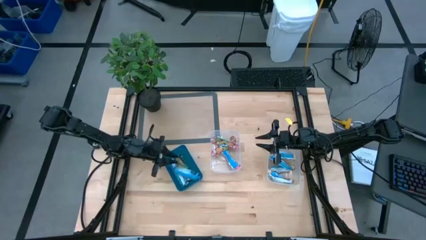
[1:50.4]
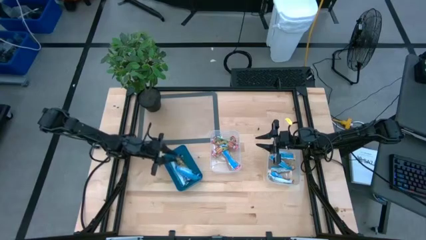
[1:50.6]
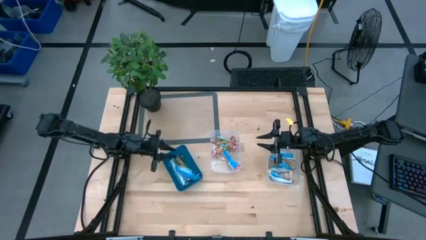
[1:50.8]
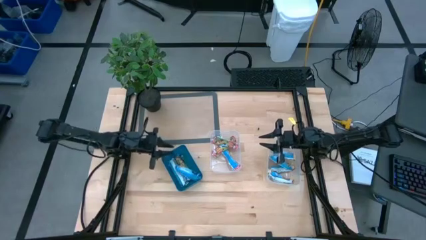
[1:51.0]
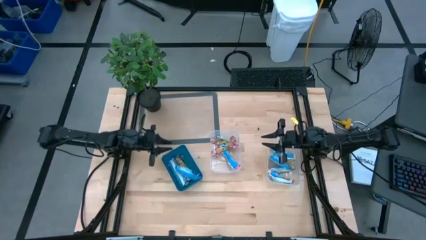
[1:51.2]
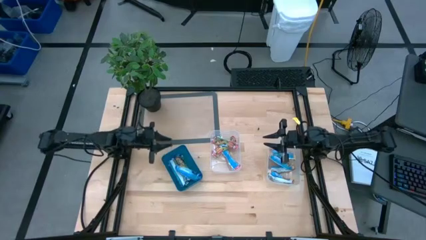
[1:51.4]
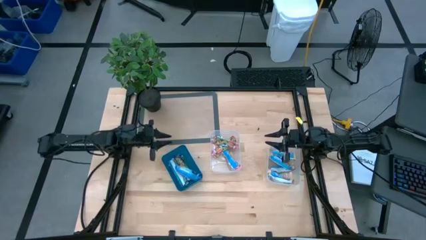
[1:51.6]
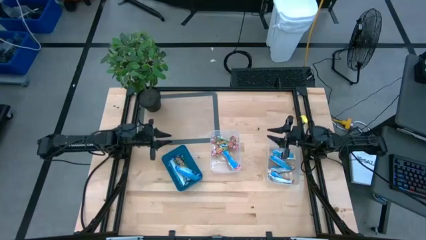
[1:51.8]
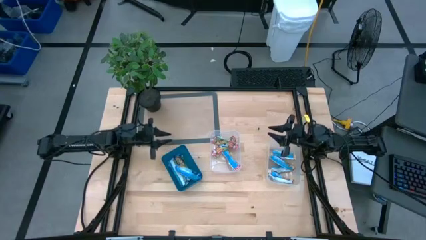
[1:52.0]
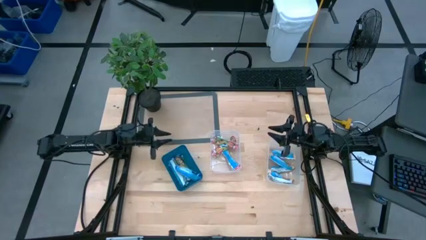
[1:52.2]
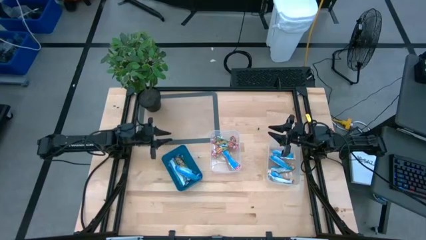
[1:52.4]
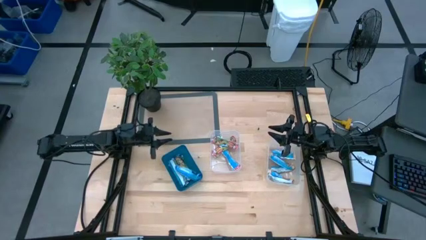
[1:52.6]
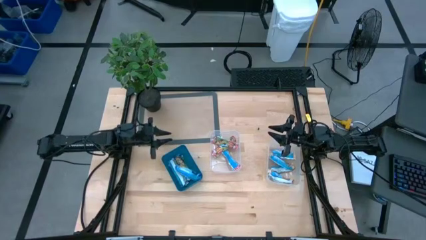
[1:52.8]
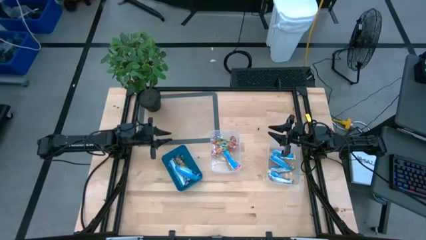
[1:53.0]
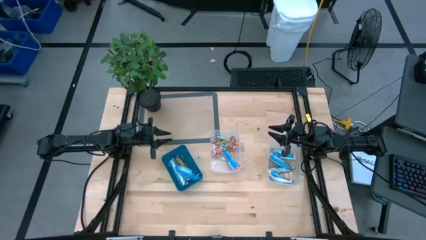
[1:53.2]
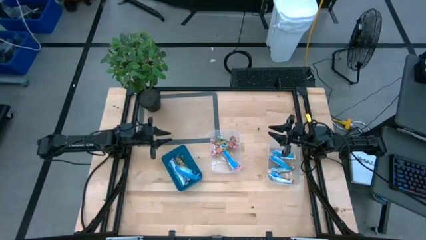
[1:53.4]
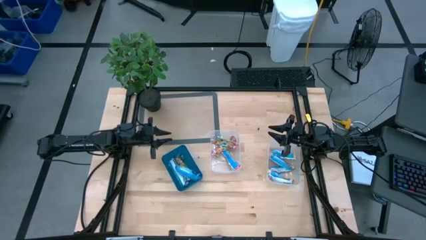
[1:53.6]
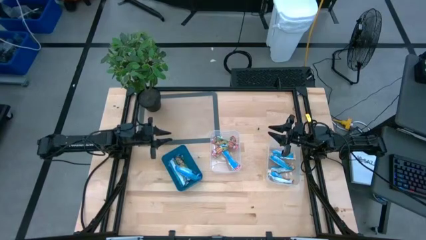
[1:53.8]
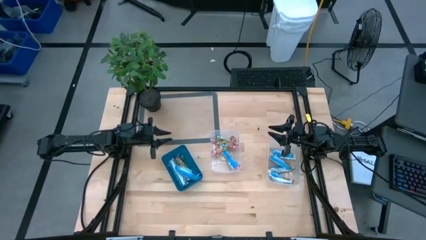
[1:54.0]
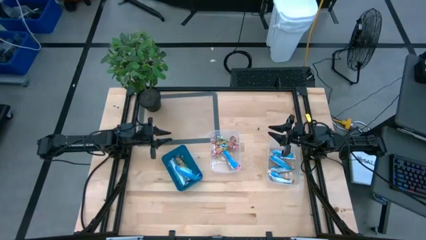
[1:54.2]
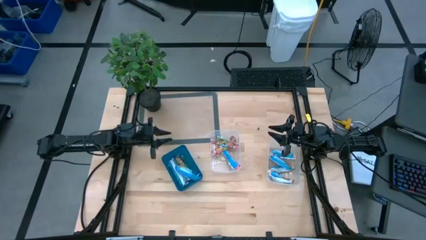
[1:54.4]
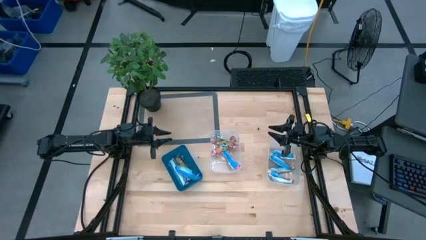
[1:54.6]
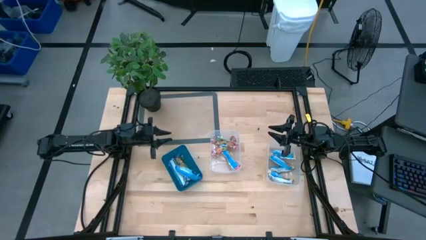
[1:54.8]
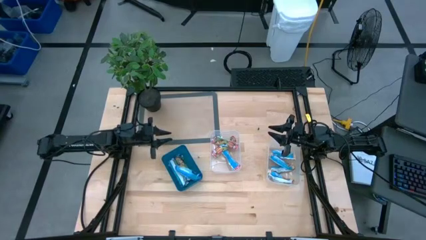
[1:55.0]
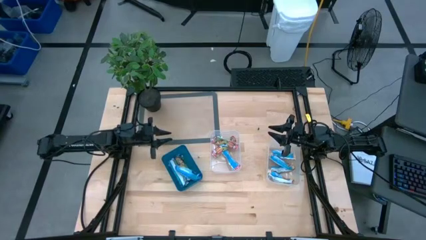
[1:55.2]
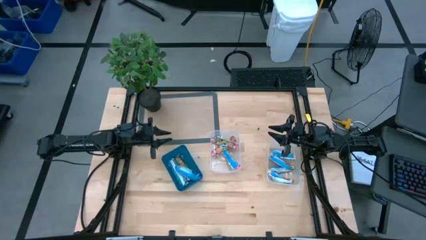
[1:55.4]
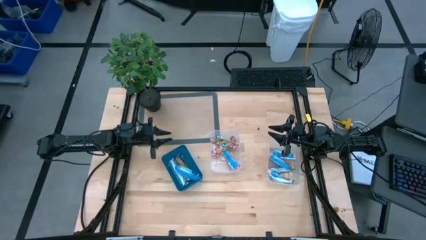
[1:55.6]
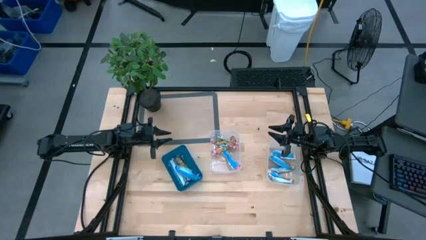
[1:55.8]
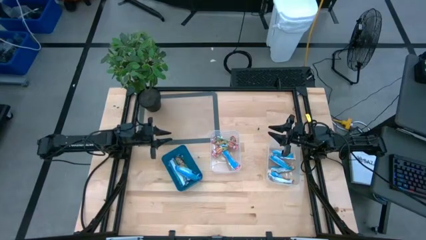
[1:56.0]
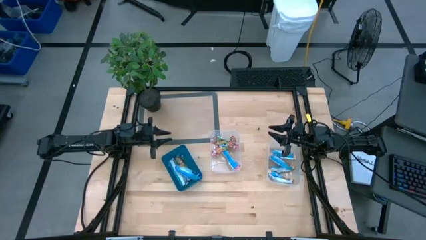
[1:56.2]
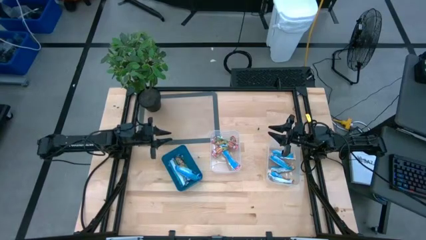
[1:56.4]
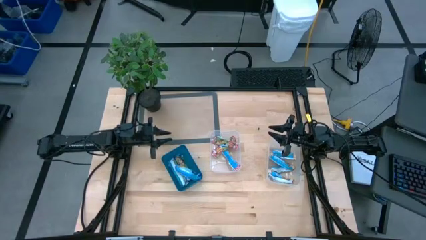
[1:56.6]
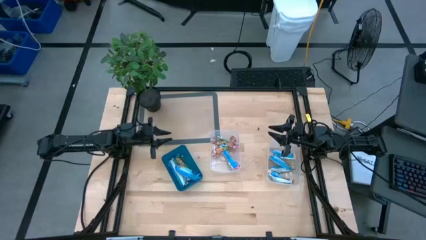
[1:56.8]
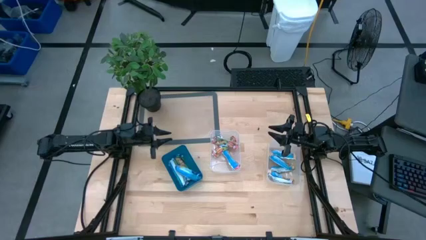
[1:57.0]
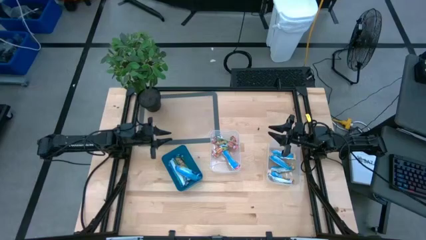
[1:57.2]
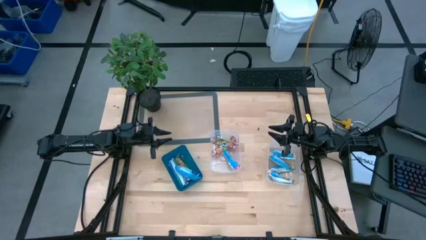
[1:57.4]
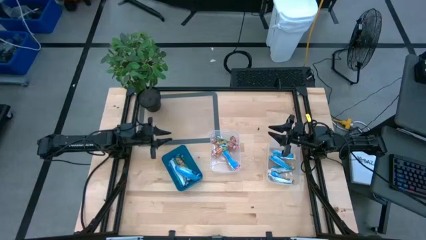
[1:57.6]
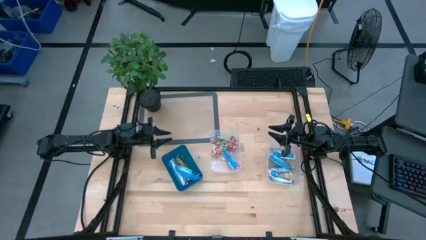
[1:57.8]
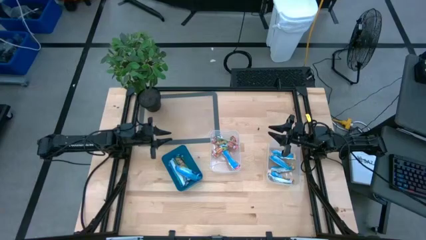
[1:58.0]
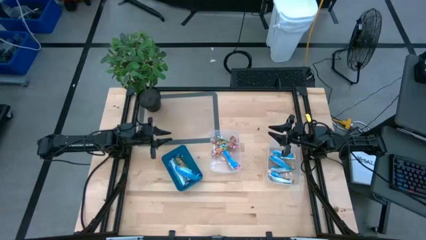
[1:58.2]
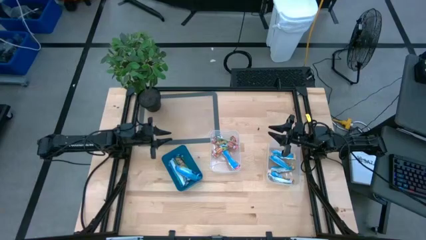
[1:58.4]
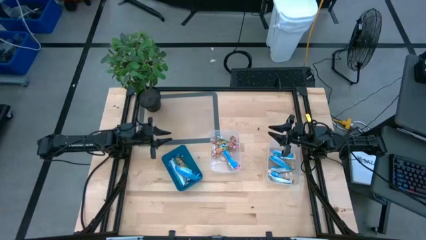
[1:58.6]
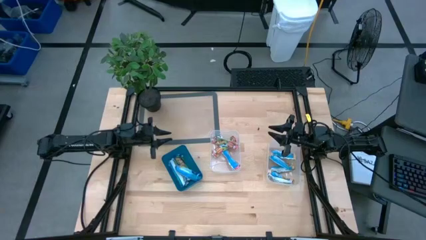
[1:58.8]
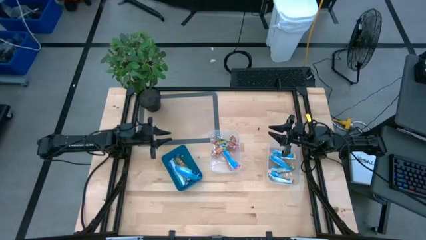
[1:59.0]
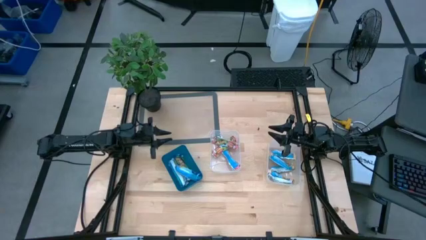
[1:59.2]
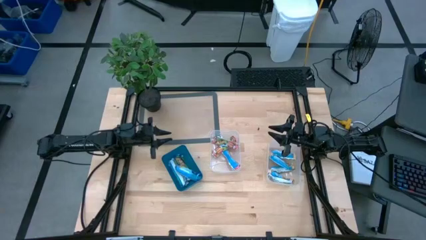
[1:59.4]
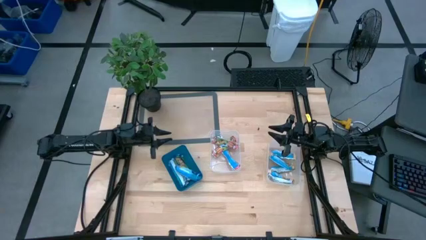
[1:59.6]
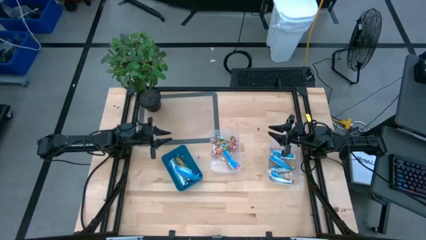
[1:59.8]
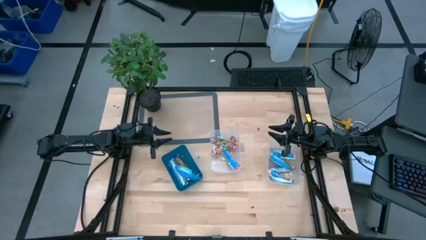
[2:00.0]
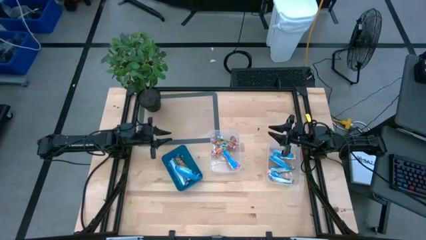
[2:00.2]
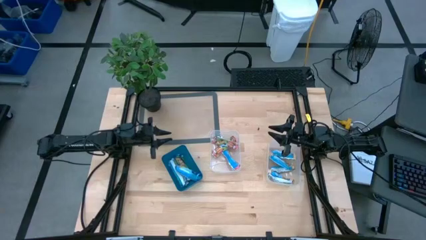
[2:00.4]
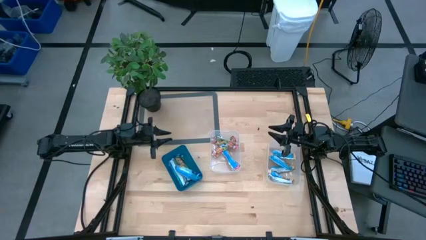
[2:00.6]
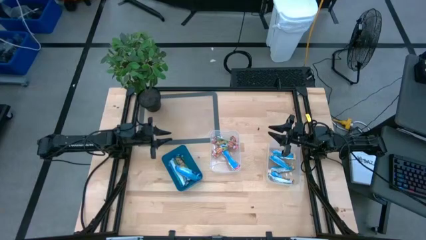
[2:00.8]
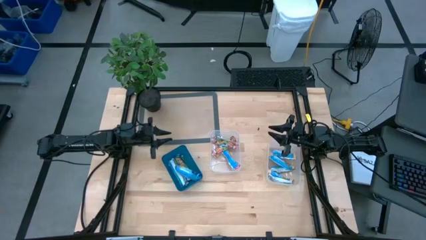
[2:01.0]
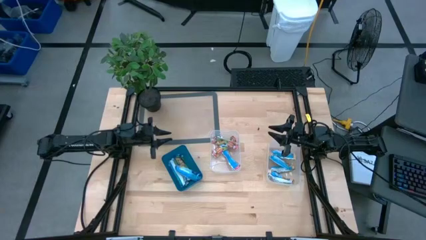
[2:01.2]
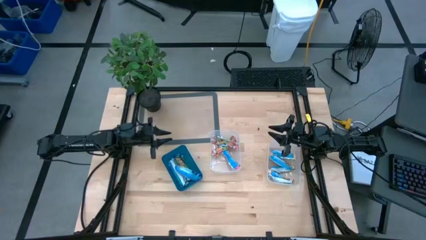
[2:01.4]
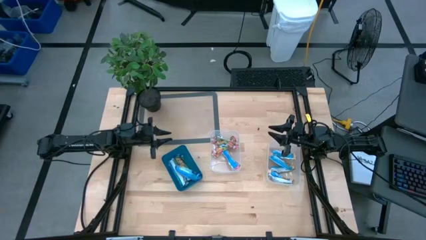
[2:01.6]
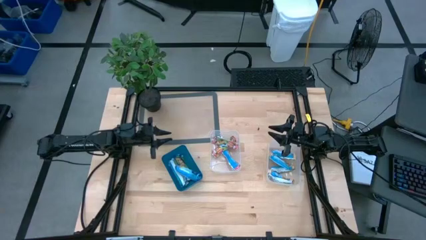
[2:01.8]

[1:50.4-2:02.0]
Task: Pick and place Granola Bars by type
Return to Home Position

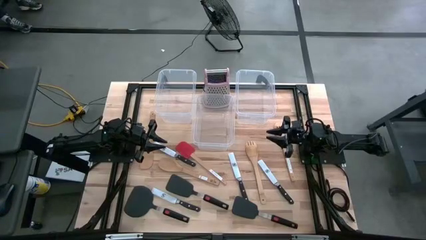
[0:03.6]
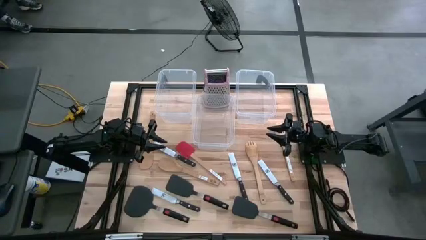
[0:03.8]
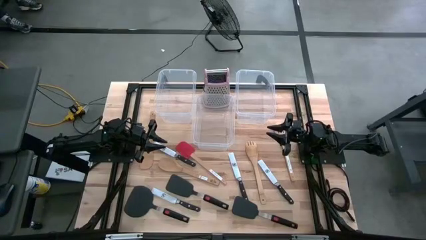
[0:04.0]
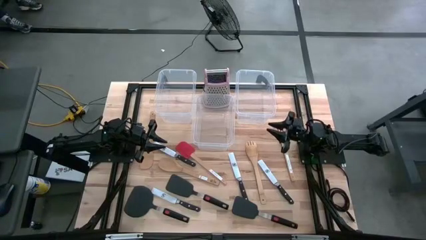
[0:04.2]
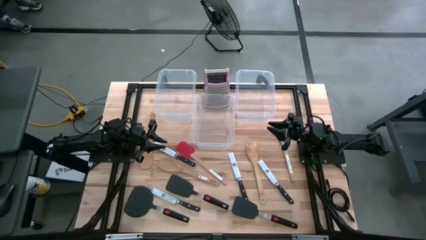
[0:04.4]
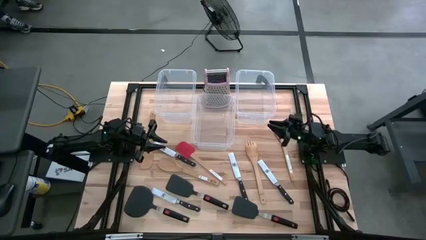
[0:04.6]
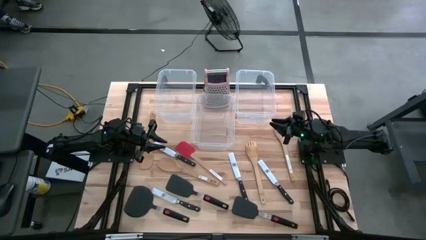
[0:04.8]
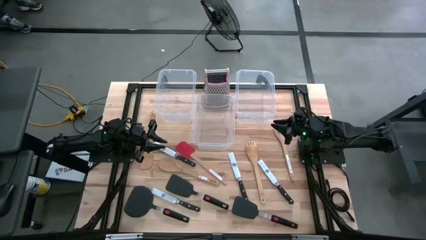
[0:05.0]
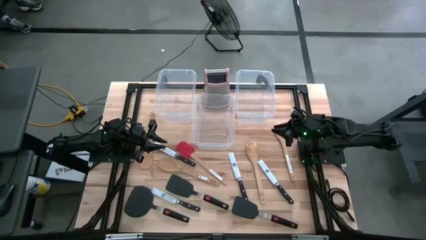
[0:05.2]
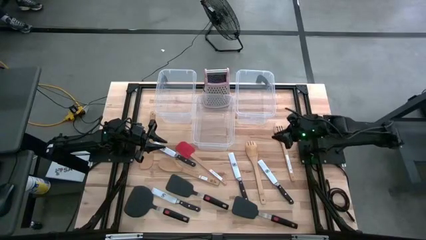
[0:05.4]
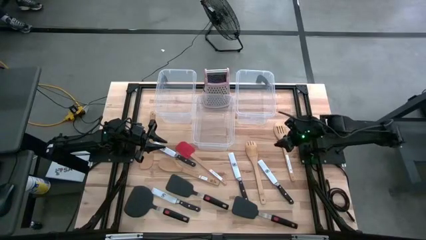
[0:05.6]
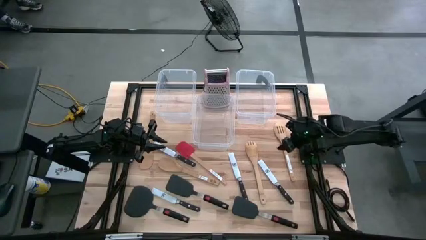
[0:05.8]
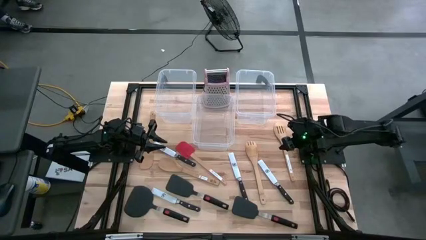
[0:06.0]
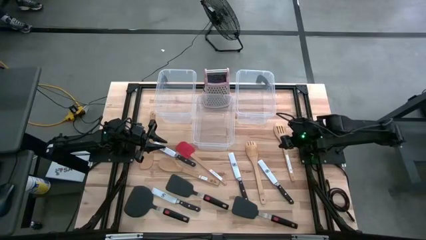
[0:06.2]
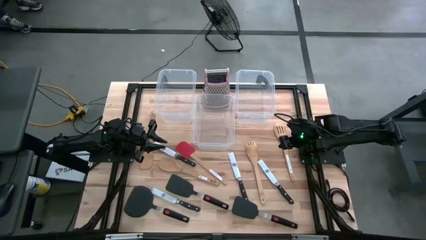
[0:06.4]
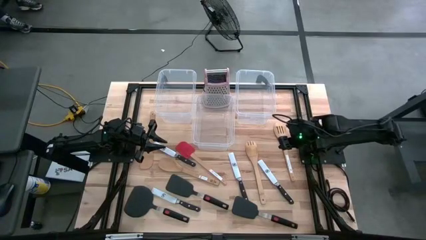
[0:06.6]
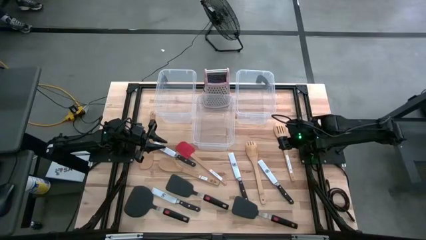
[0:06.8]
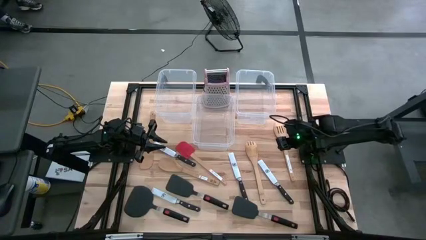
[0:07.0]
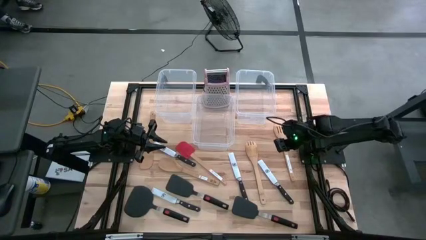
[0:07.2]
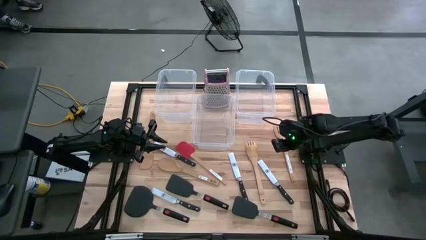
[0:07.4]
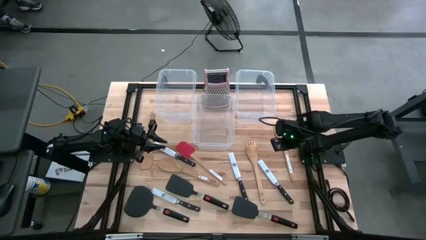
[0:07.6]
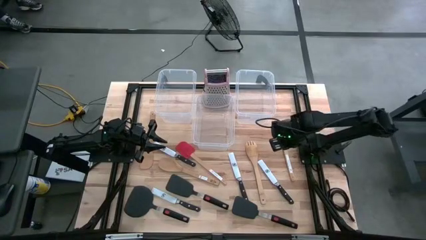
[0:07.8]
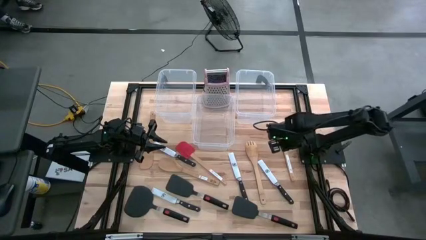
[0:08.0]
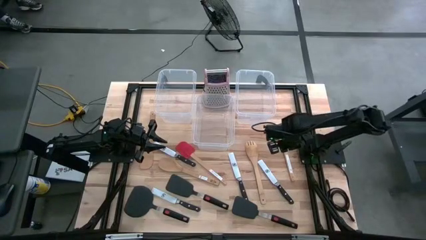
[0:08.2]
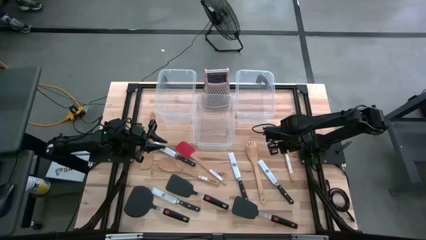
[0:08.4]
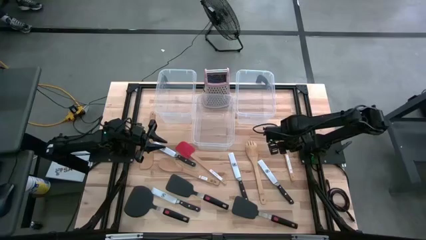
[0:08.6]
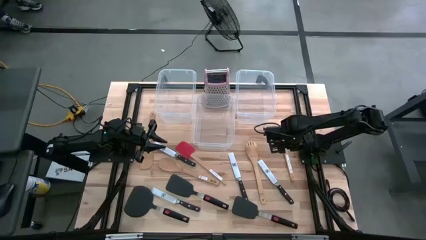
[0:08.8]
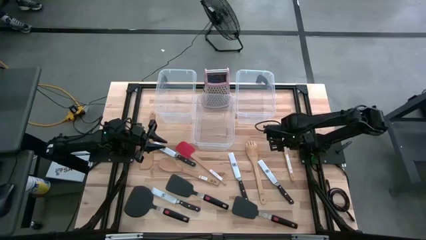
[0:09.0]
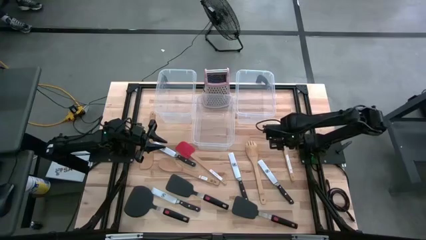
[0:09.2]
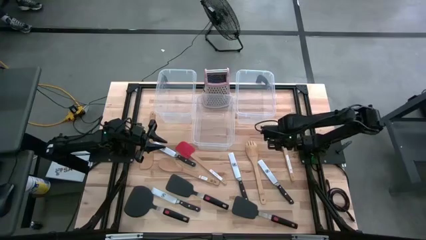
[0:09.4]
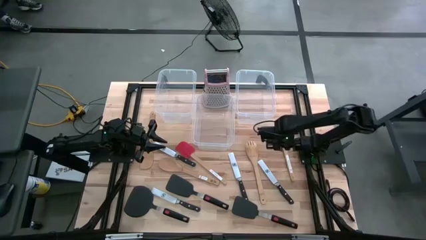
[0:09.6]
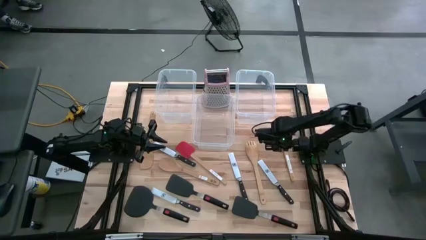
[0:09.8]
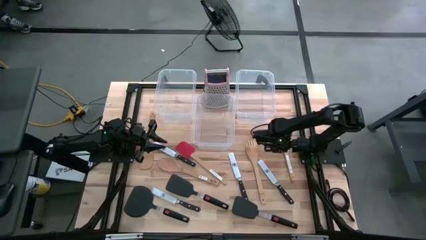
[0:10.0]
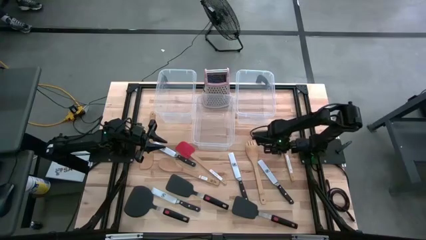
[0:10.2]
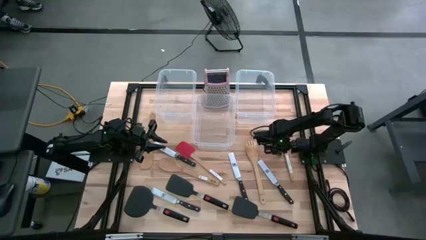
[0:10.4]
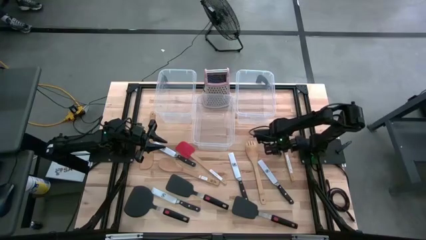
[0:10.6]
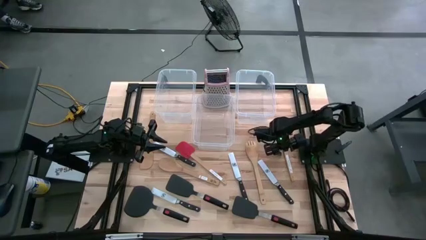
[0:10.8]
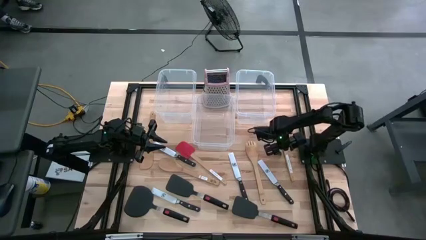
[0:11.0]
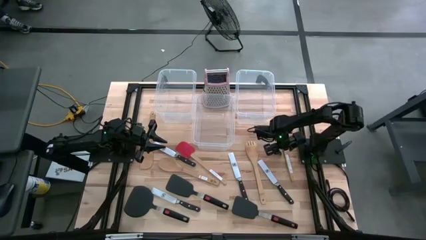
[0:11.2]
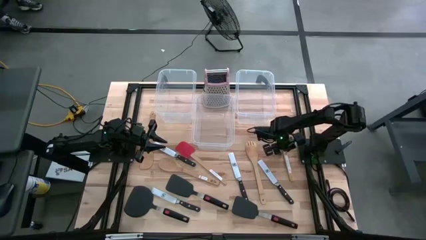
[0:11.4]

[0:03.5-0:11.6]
Task: Pick & Place Kitchen Items
Put the brown serving spoon into the right transparent bin
